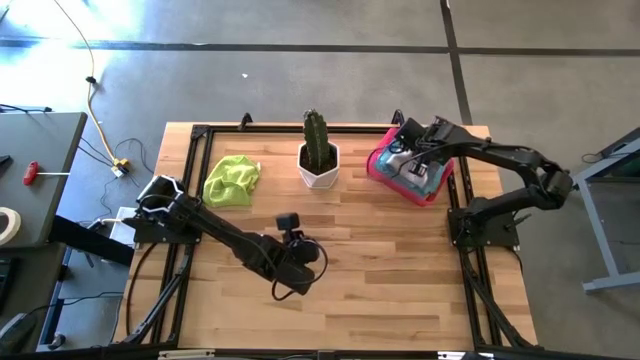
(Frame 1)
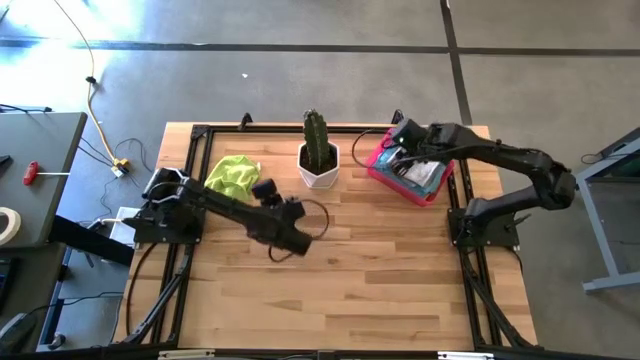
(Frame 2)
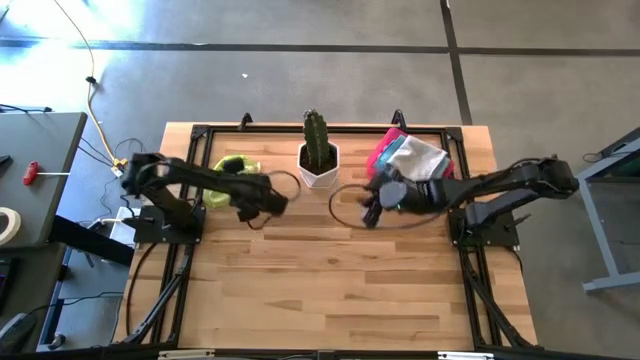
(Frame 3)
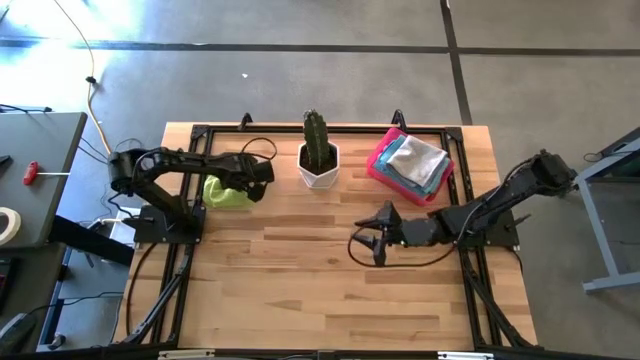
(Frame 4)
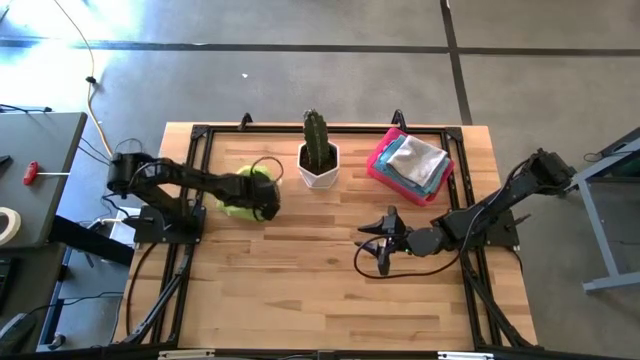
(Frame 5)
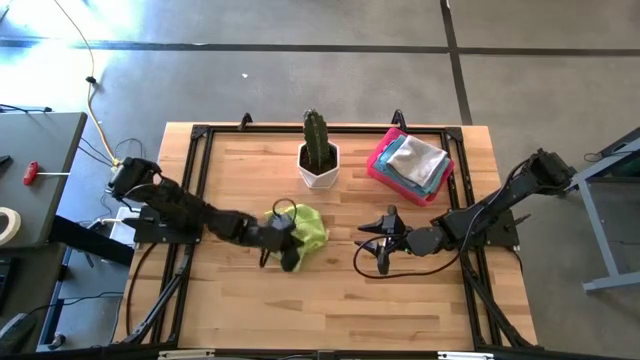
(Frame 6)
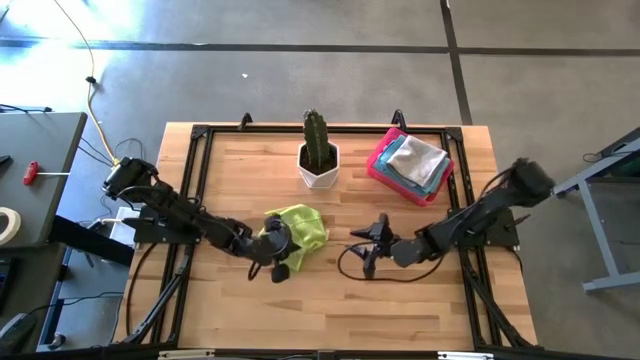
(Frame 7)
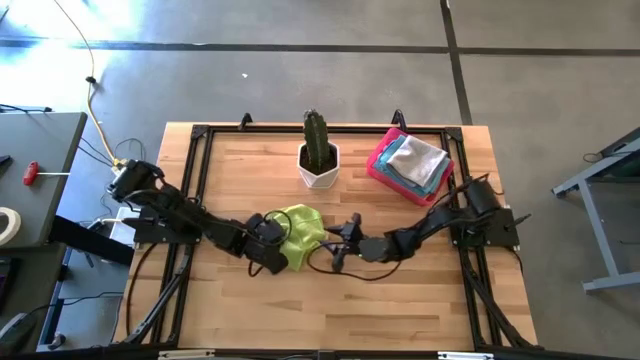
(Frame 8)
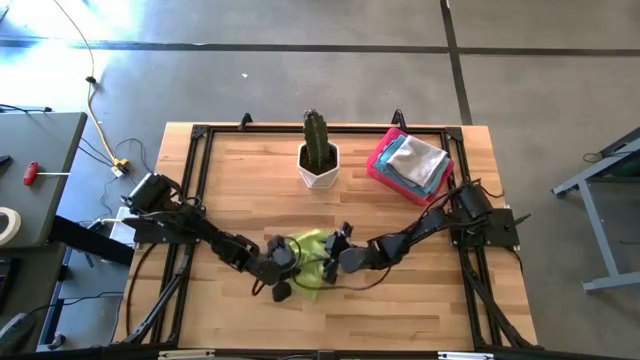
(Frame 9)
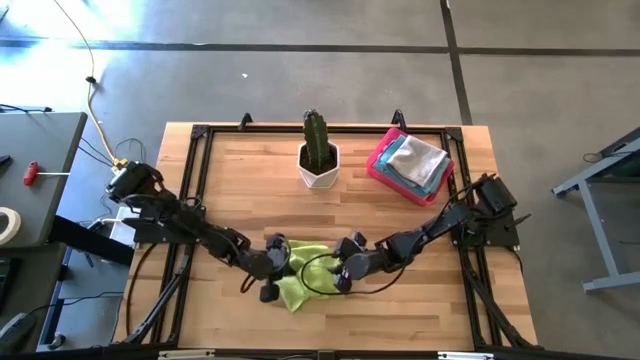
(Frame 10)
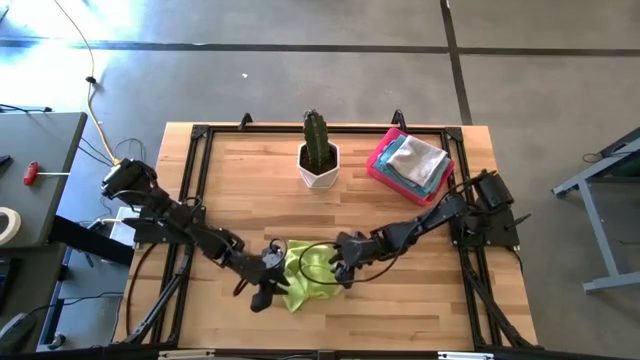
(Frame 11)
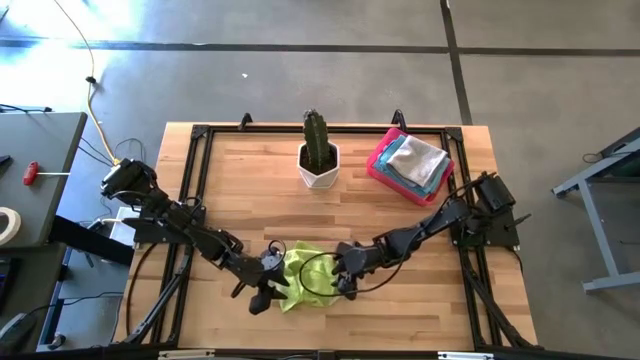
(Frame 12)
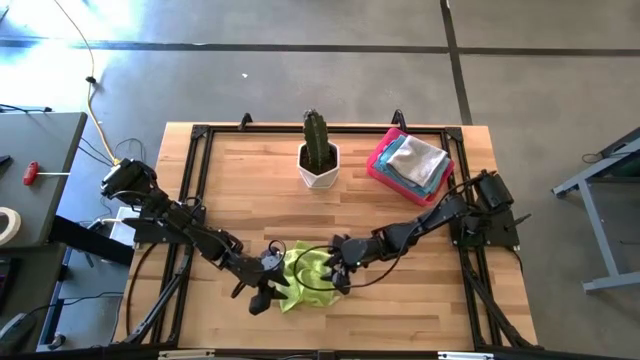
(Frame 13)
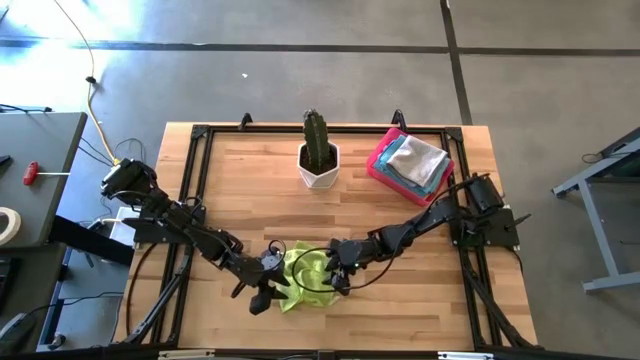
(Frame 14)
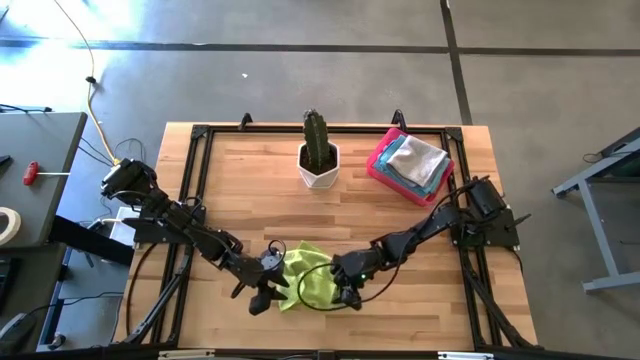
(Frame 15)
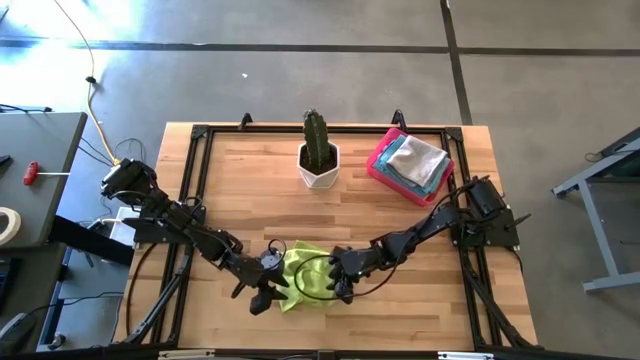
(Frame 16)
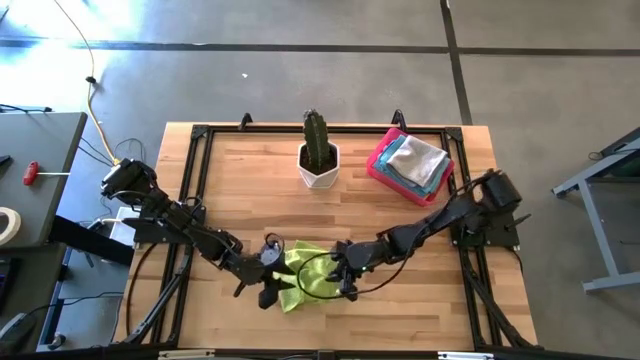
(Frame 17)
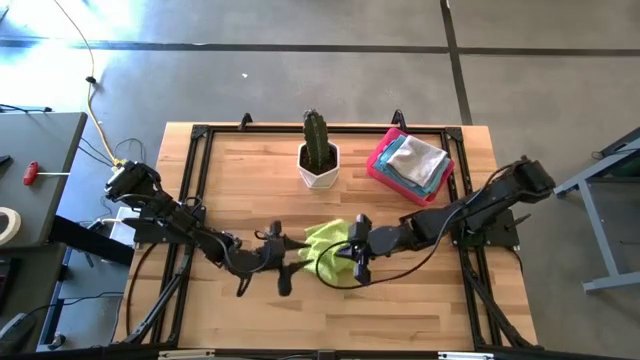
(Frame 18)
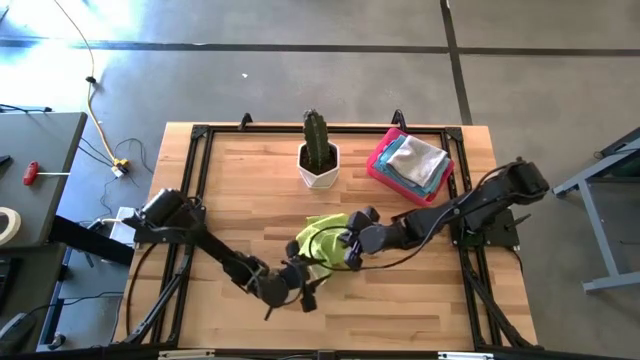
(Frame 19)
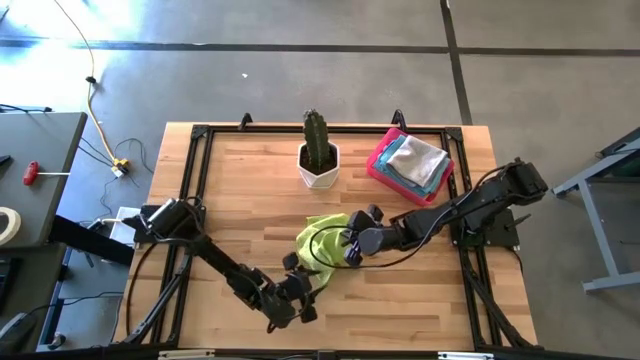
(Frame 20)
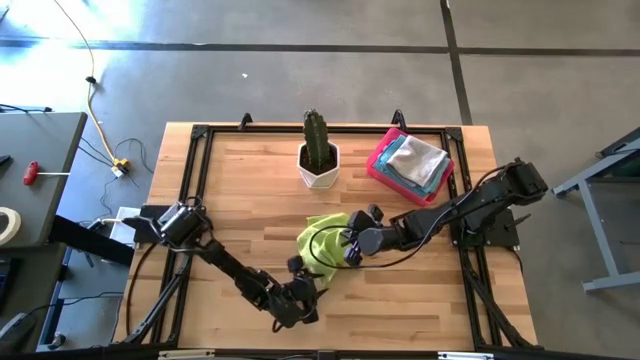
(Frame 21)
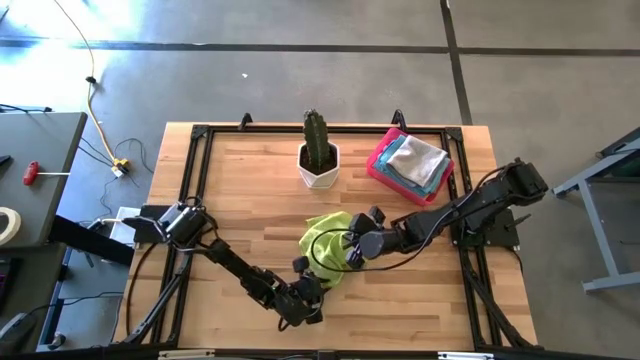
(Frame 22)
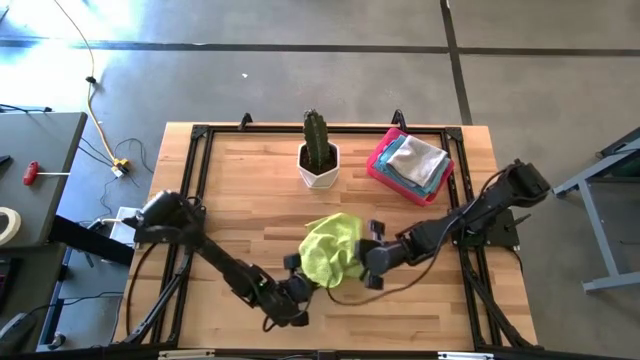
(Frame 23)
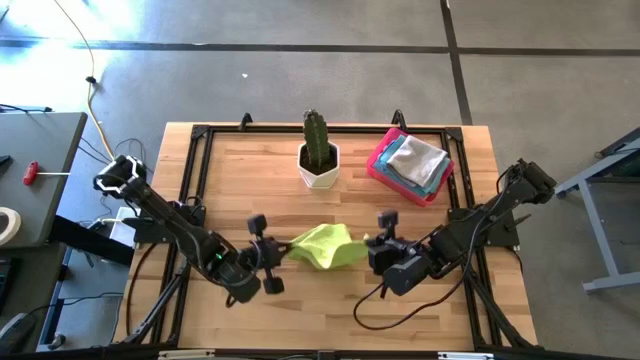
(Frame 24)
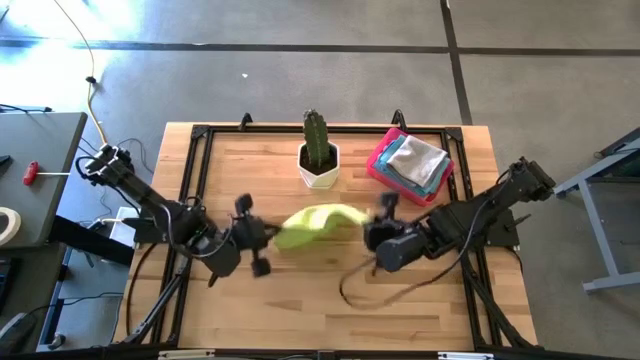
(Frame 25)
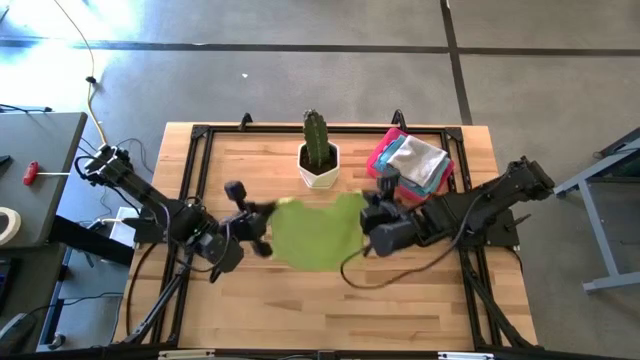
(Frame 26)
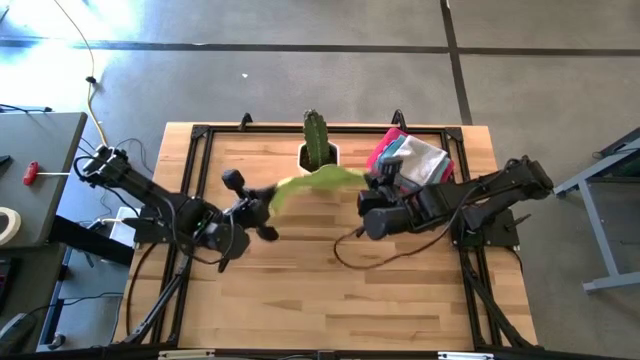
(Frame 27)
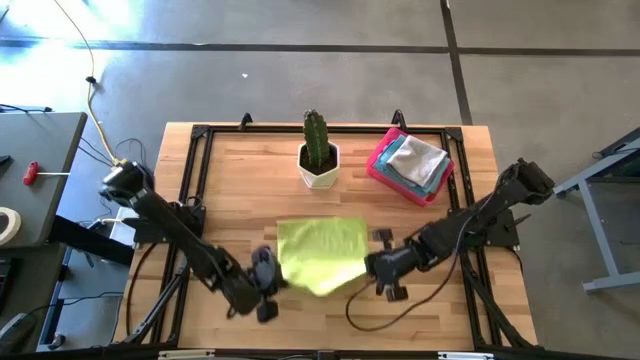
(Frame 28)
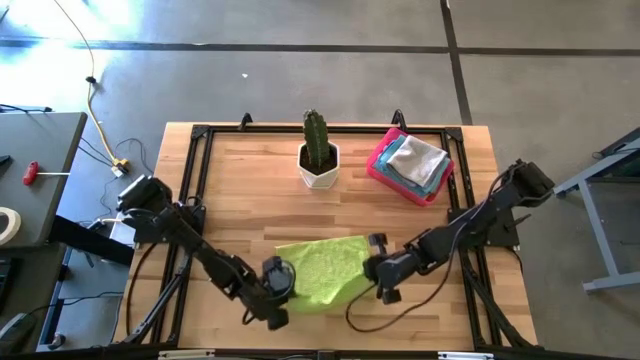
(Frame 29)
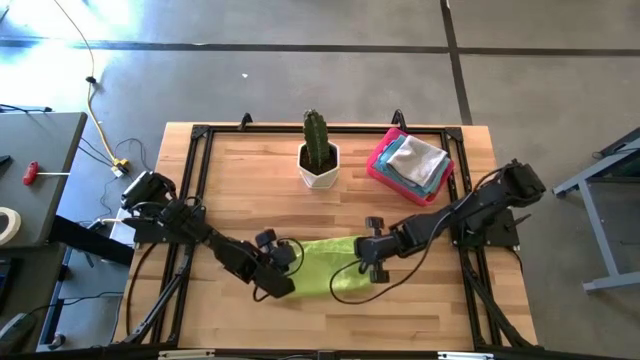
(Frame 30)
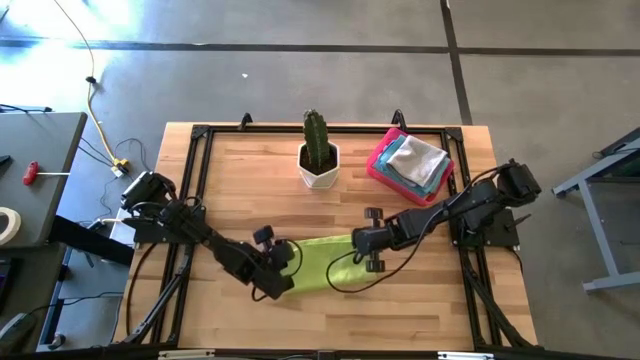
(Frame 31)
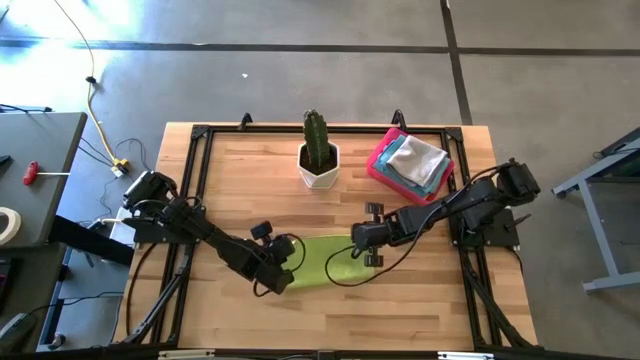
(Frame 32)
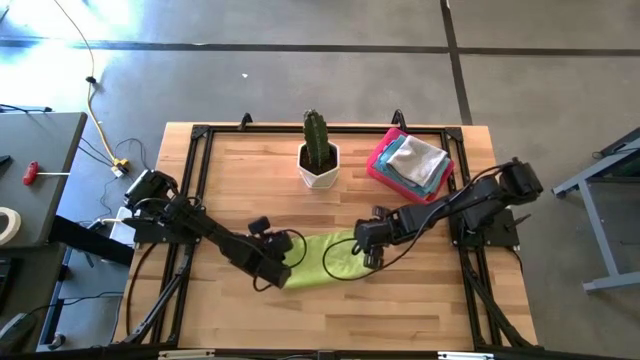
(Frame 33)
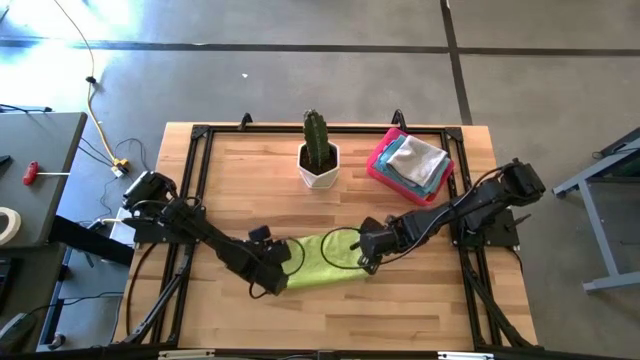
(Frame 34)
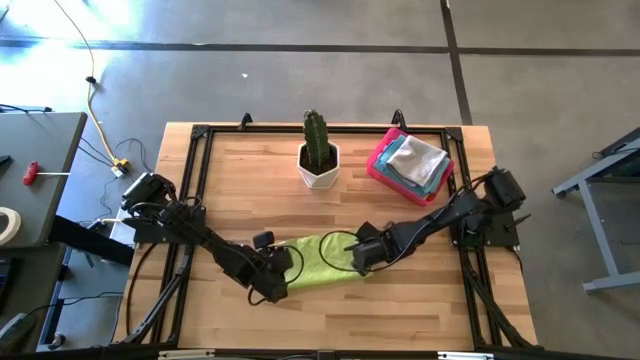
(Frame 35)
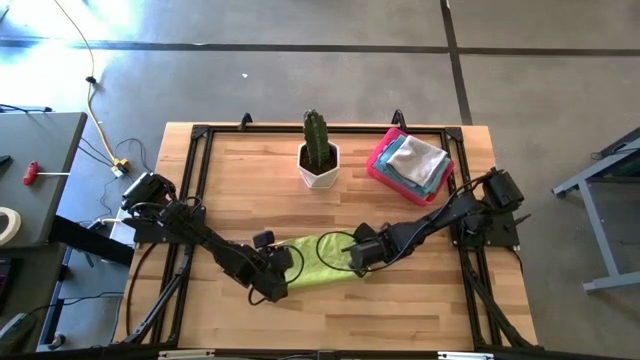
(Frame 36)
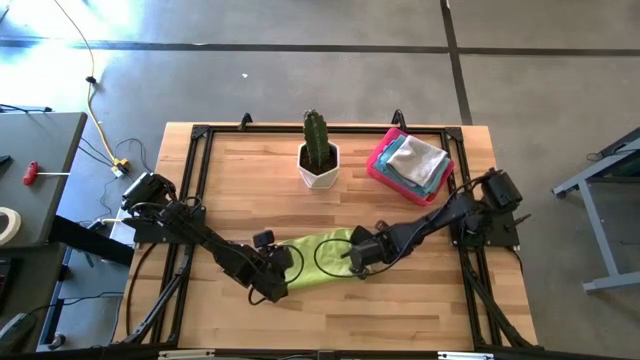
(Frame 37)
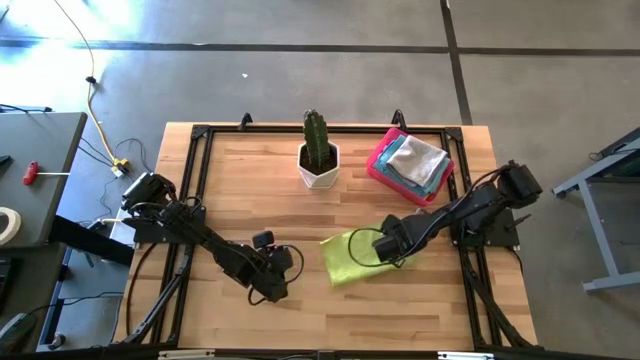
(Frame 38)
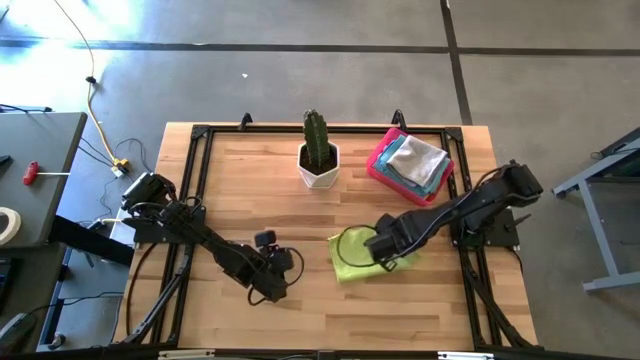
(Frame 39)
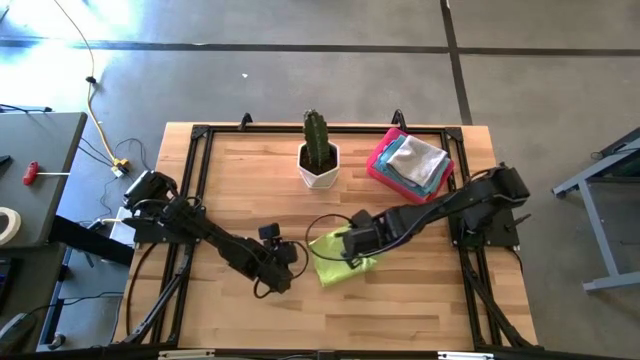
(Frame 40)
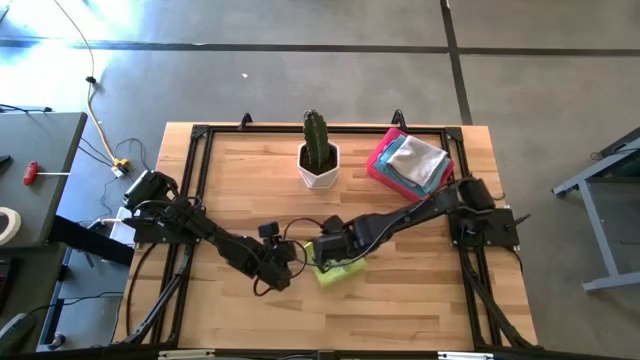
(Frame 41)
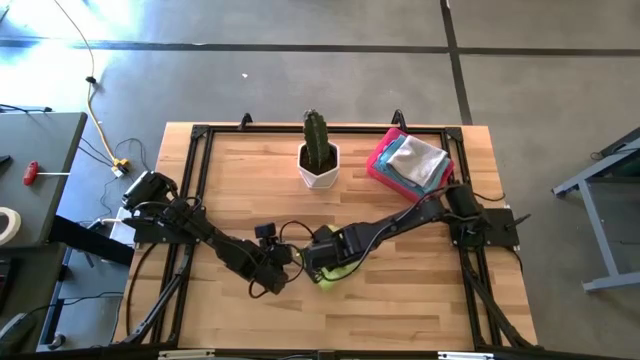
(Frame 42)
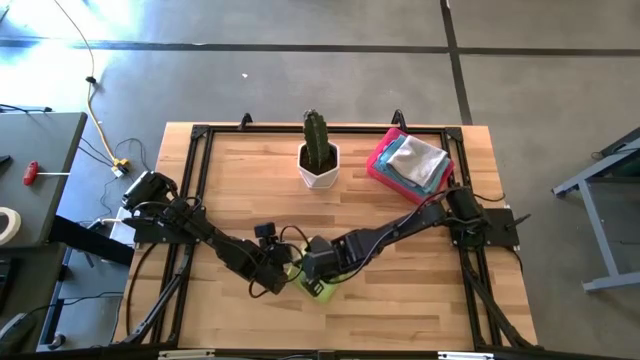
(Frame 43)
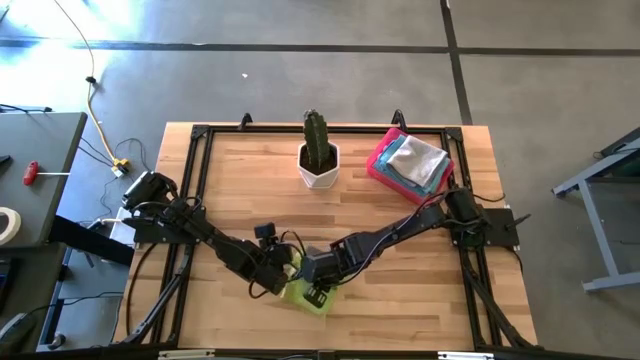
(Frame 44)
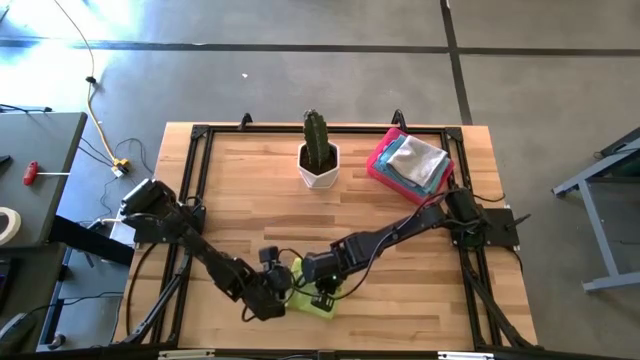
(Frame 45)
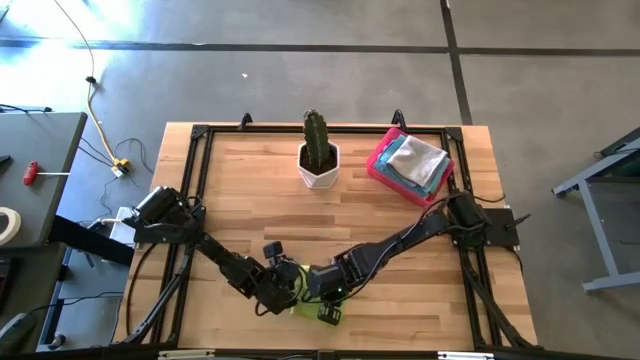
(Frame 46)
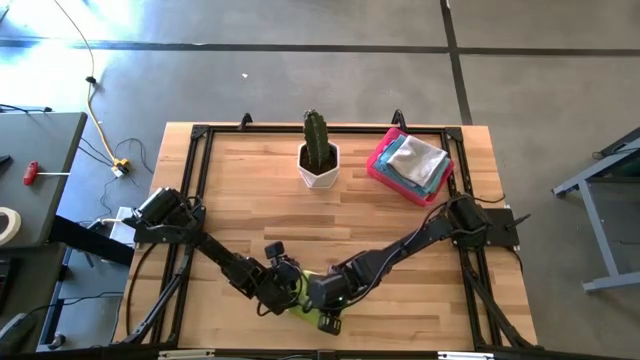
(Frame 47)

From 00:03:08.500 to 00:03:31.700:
Task: Fold microfiber towels
Fold the green microfiber towel
